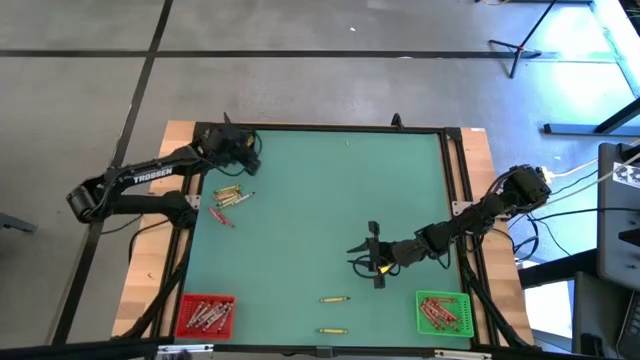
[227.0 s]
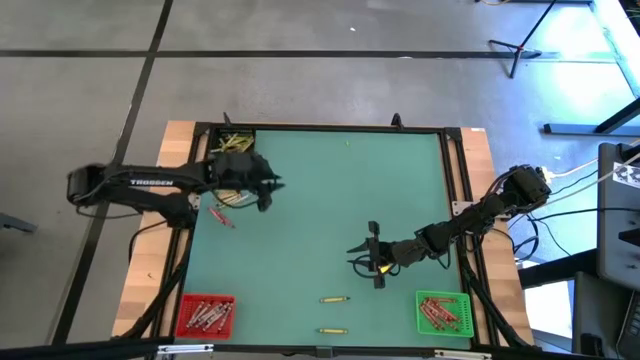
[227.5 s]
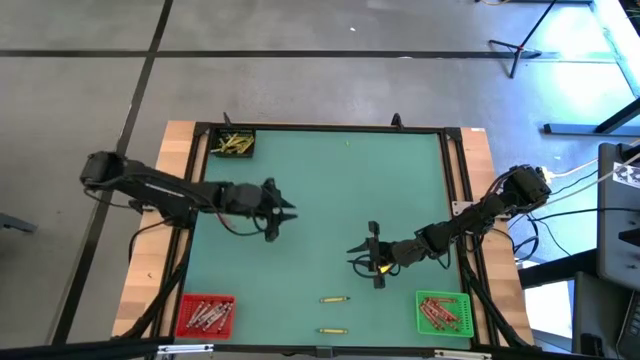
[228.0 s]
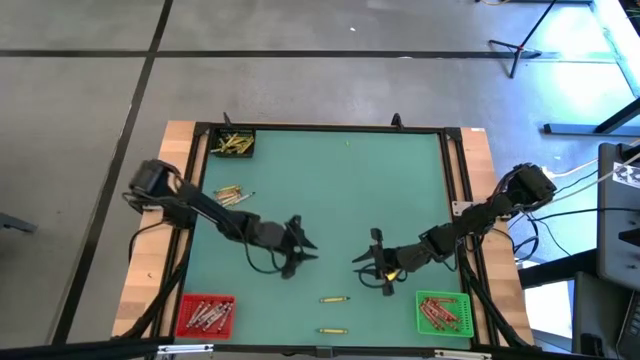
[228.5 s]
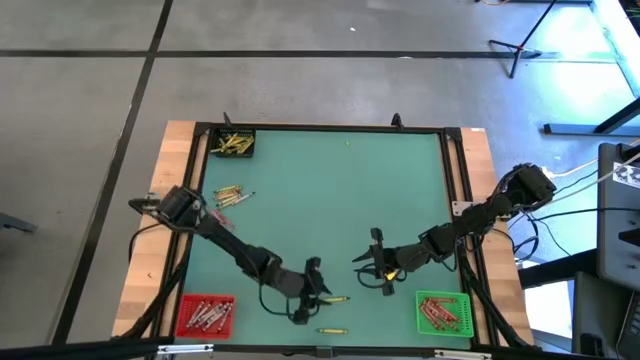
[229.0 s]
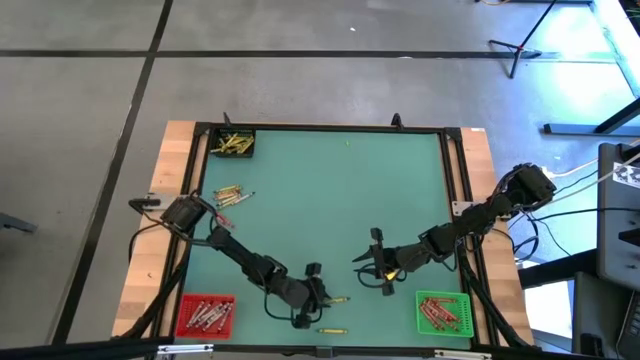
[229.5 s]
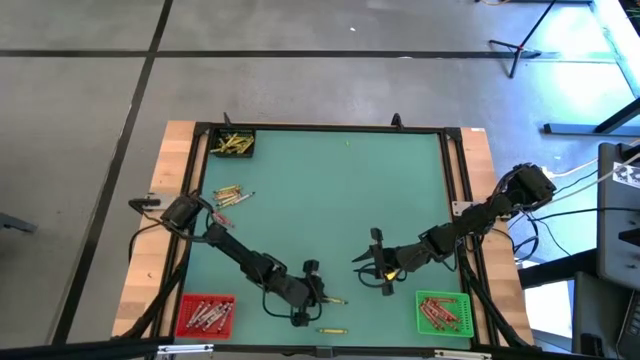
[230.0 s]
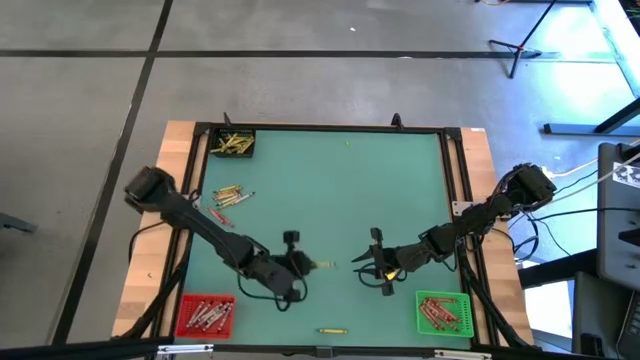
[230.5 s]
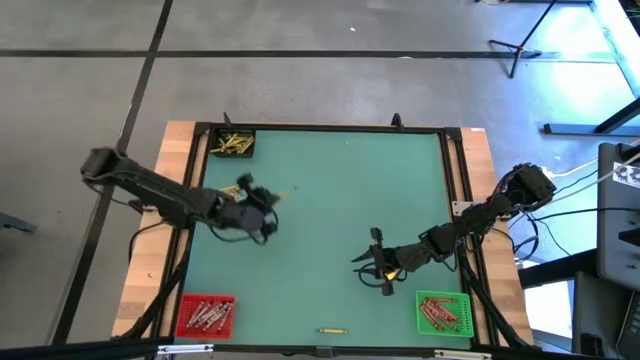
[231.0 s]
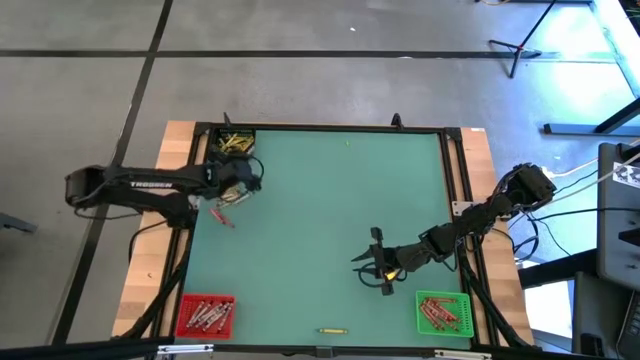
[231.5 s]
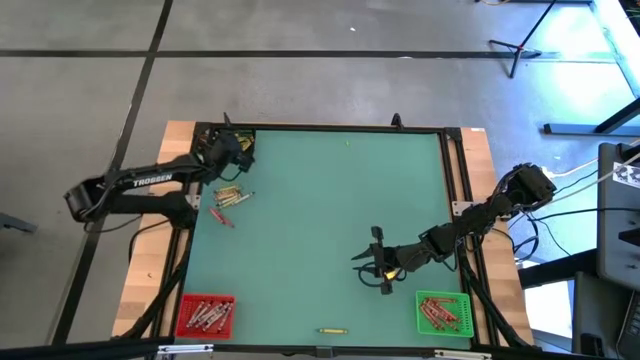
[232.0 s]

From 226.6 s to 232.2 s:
Task: Sort crayons
Put the green crayon into the black bin

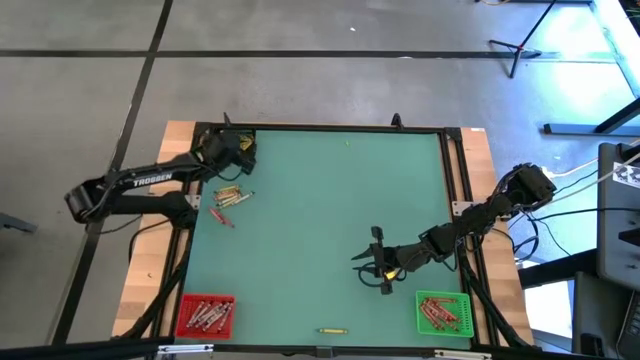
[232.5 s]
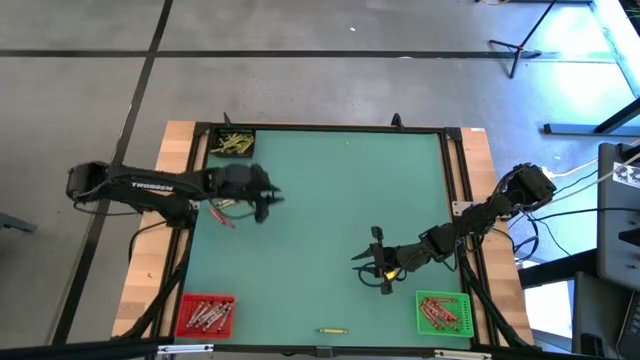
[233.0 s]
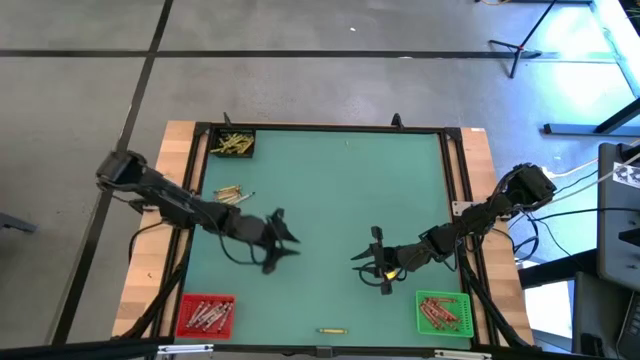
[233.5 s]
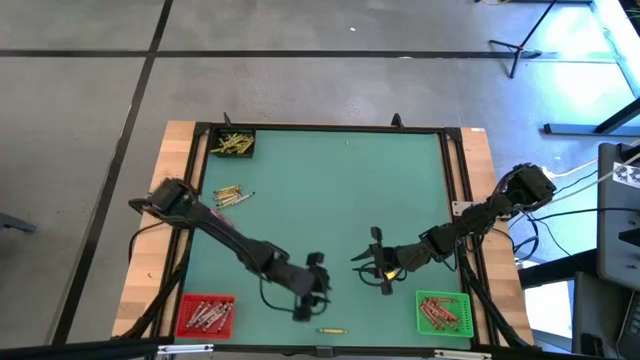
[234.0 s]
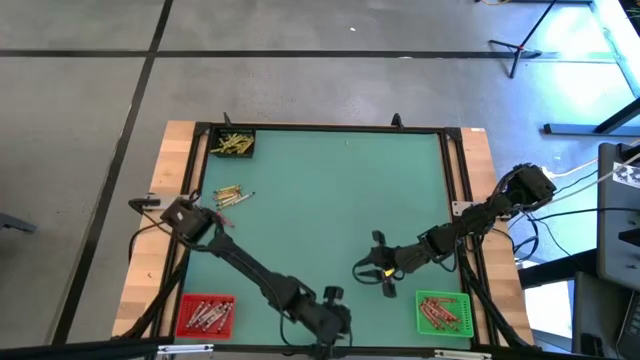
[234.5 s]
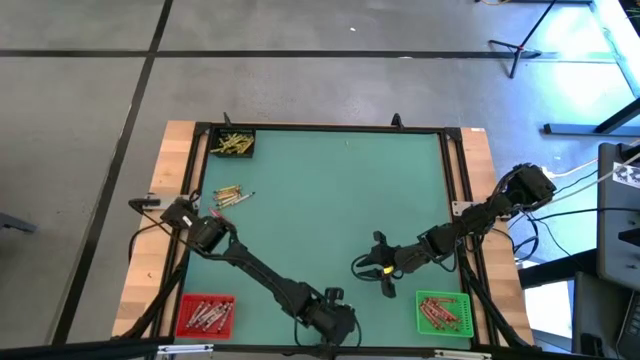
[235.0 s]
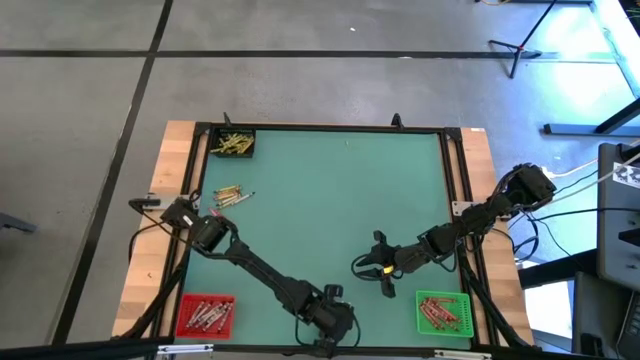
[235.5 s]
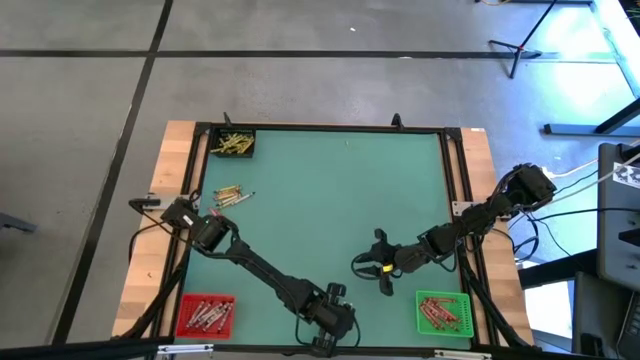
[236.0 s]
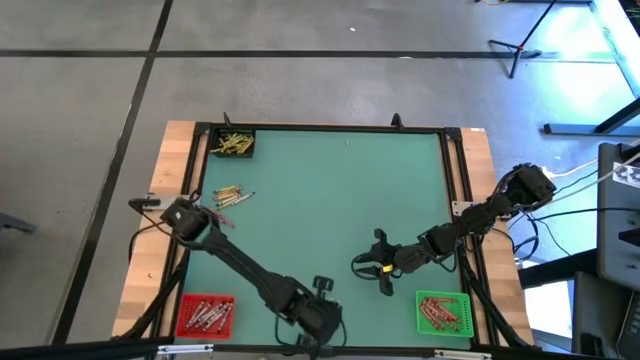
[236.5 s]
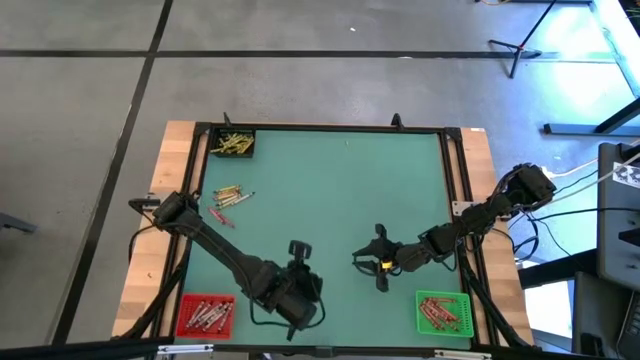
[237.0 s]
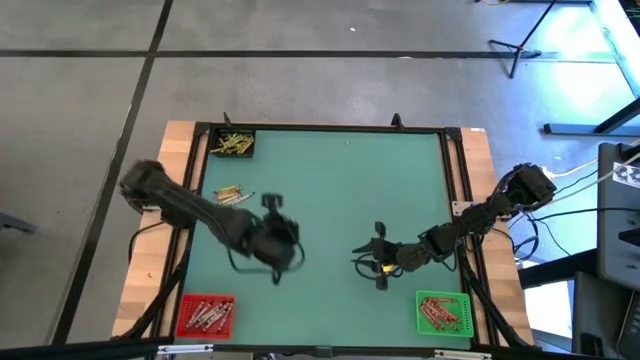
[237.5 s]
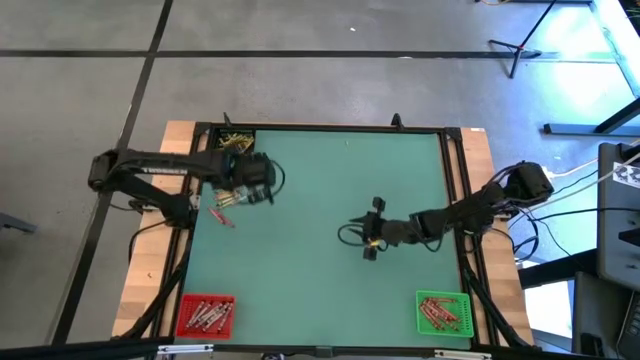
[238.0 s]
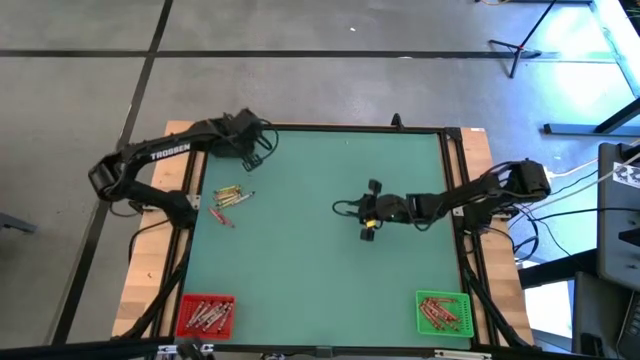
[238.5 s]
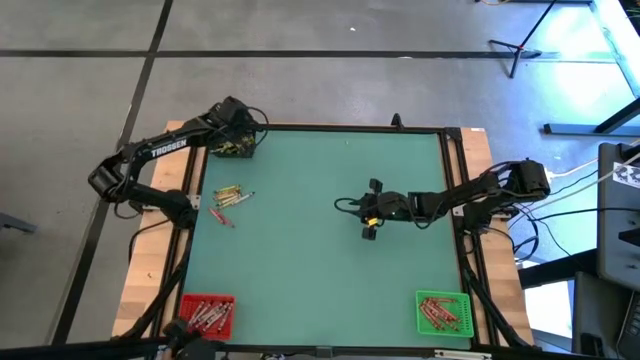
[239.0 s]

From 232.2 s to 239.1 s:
Put the green crayon into the black bin

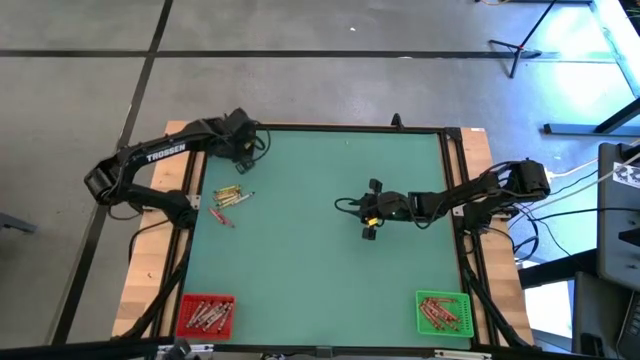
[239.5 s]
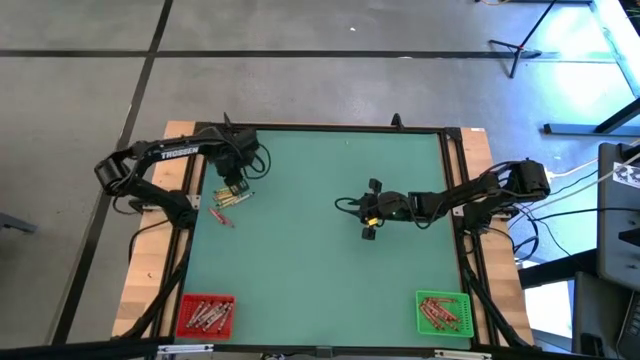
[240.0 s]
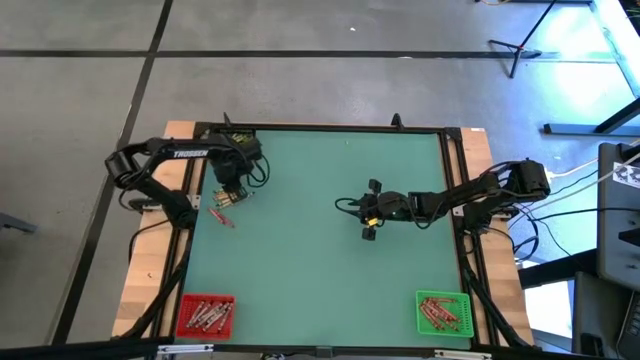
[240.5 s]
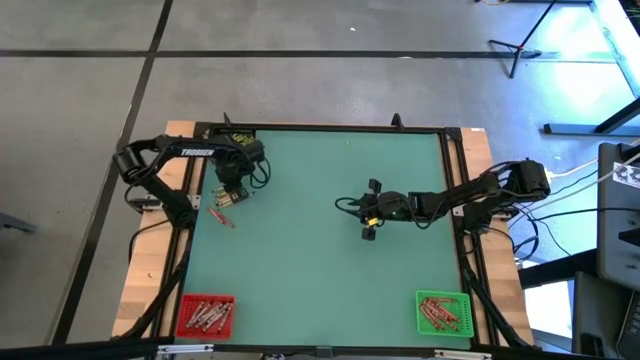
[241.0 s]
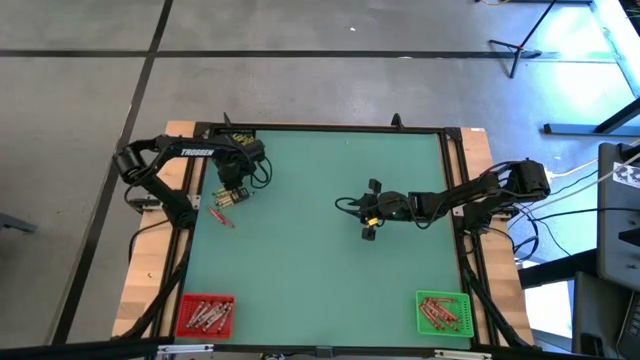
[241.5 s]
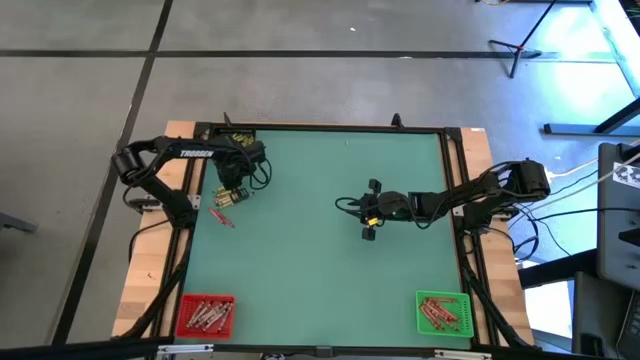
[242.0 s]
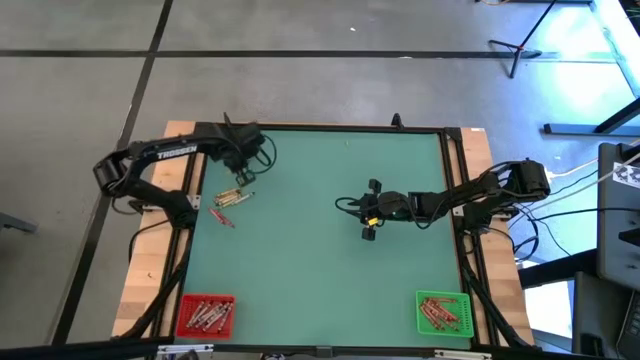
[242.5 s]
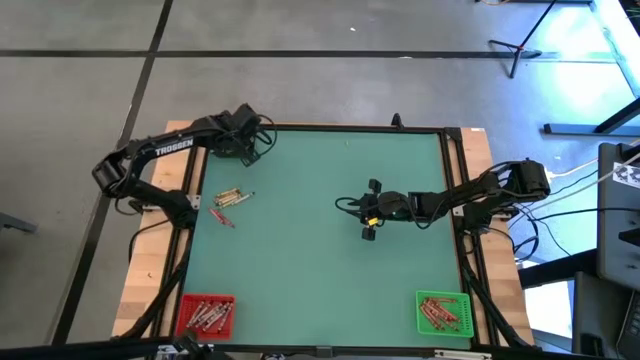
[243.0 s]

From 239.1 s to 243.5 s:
Put the green crayon into the black bin

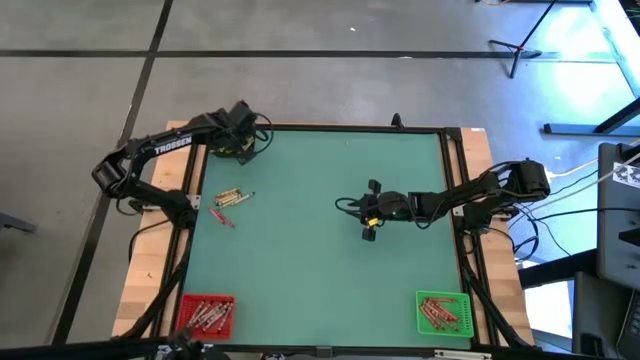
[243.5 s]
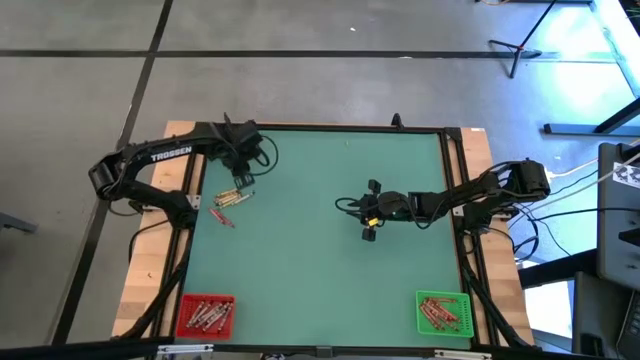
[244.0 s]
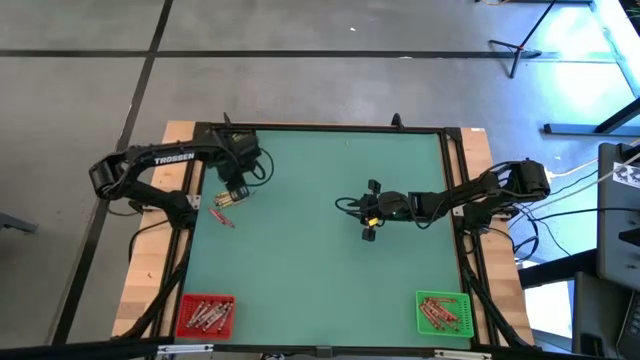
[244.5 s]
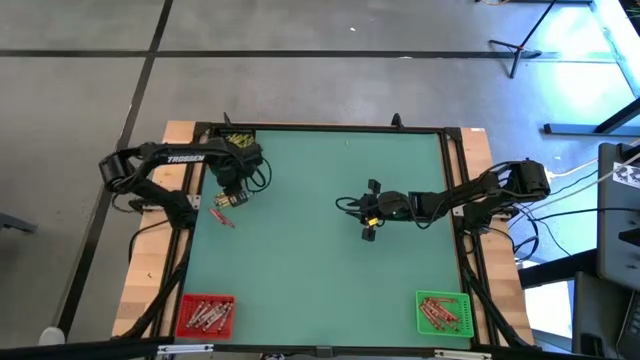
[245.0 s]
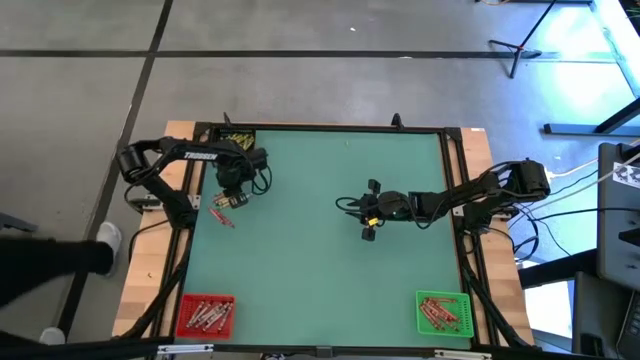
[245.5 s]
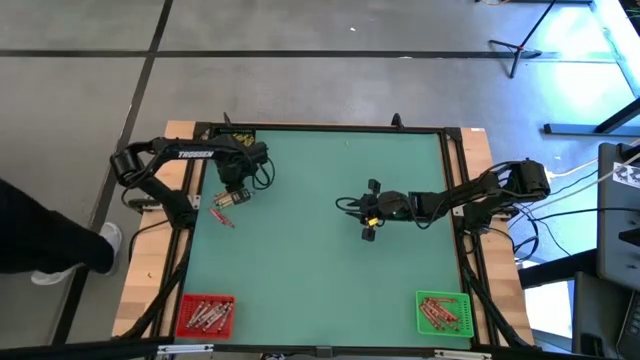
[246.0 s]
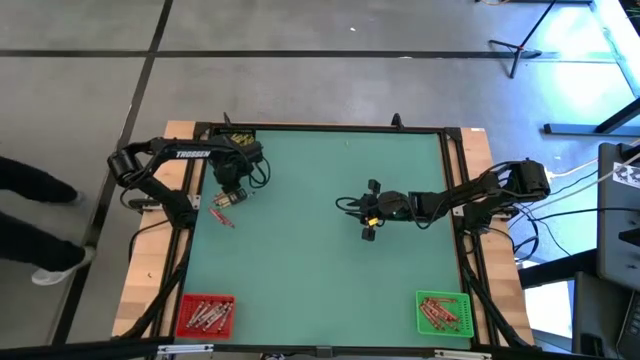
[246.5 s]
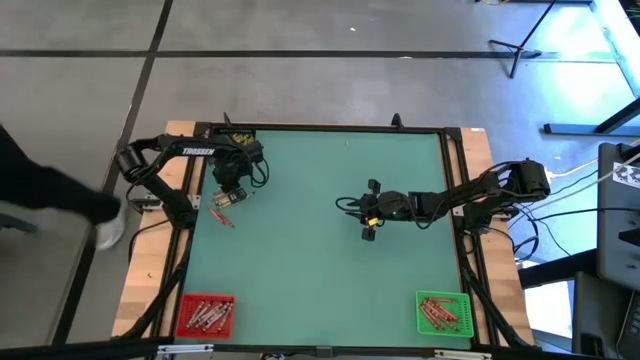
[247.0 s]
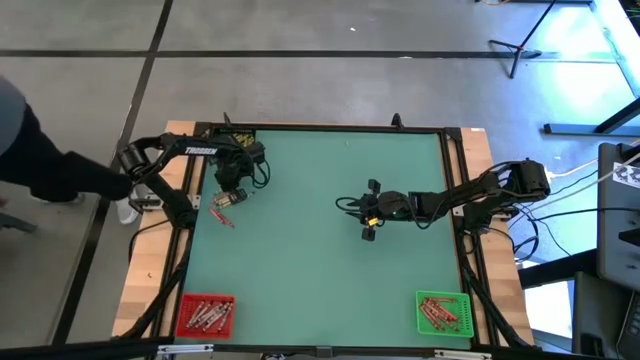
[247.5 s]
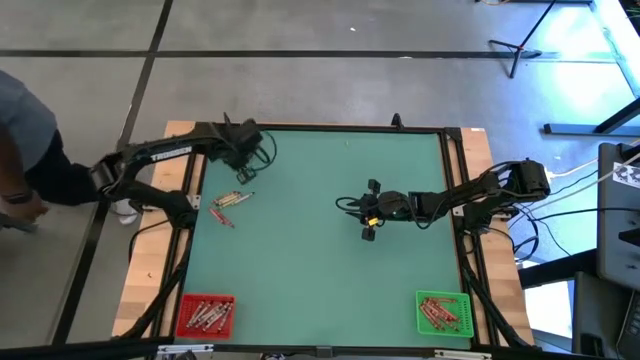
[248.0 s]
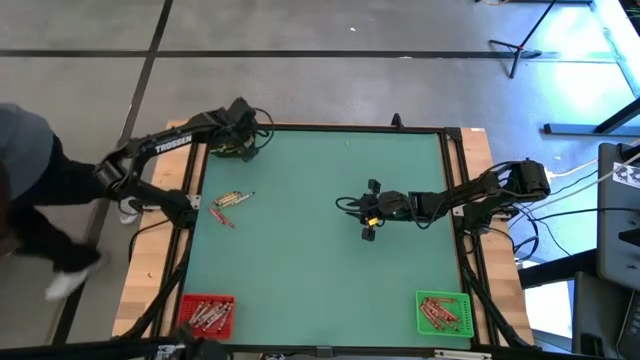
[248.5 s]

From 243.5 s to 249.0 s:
Put the top green crayon into the black bin
